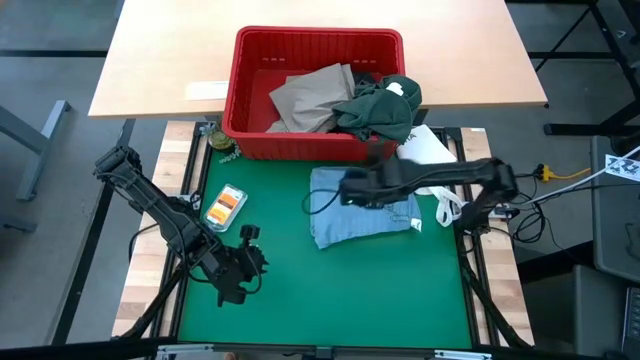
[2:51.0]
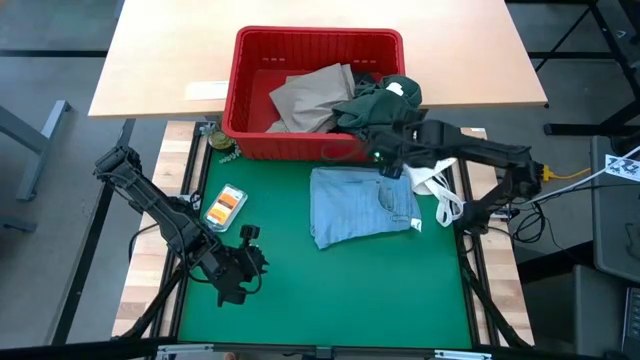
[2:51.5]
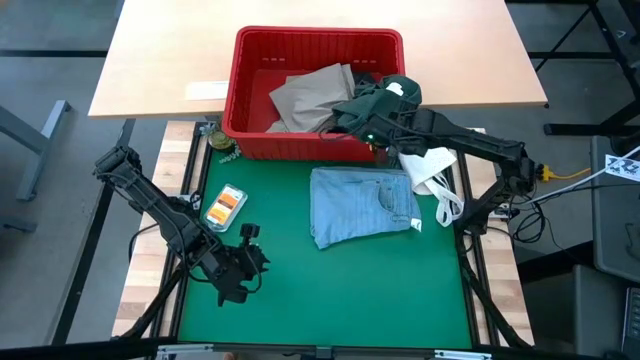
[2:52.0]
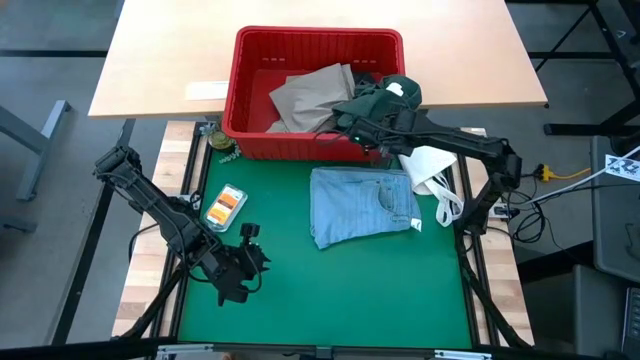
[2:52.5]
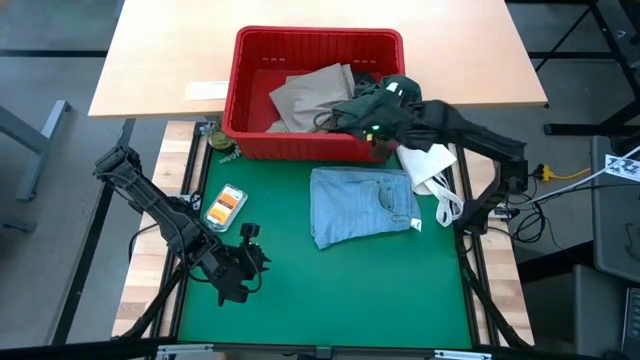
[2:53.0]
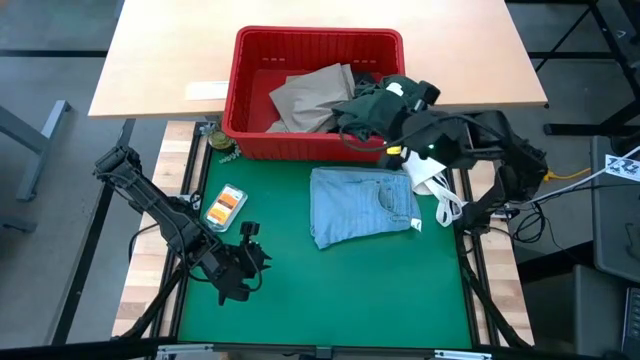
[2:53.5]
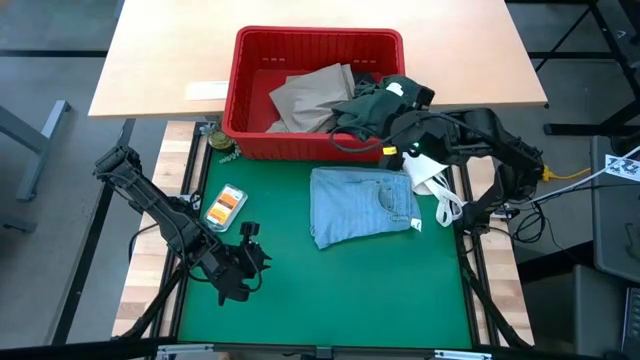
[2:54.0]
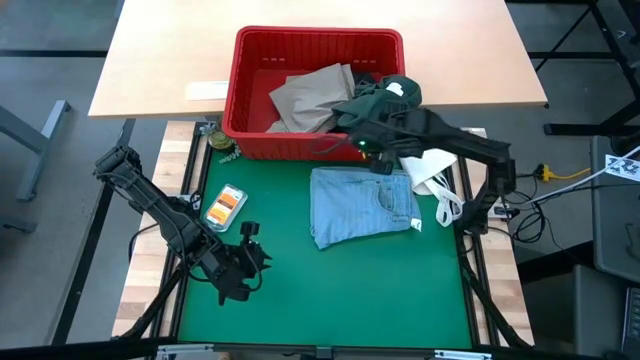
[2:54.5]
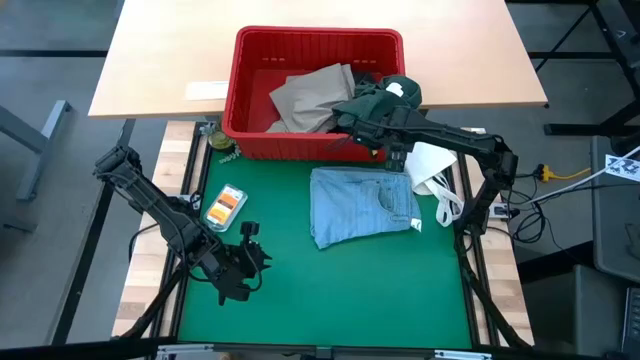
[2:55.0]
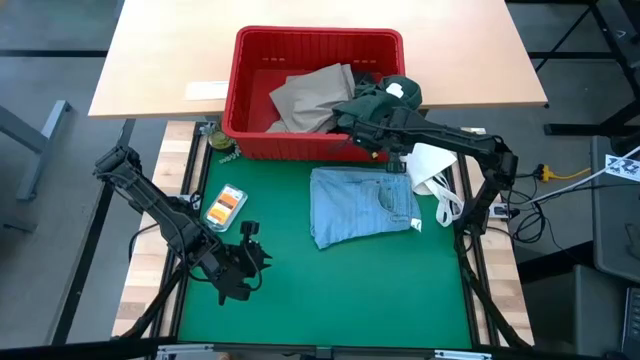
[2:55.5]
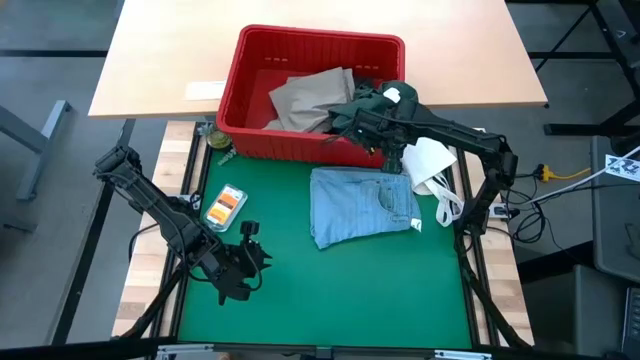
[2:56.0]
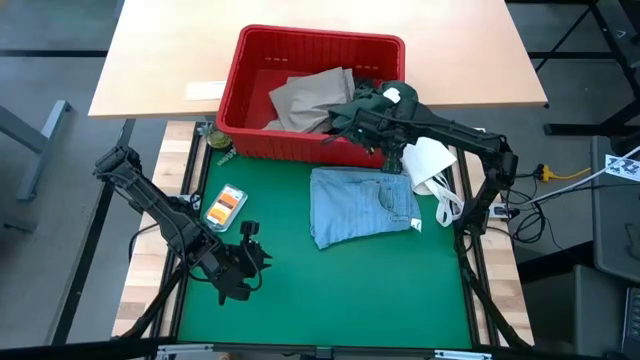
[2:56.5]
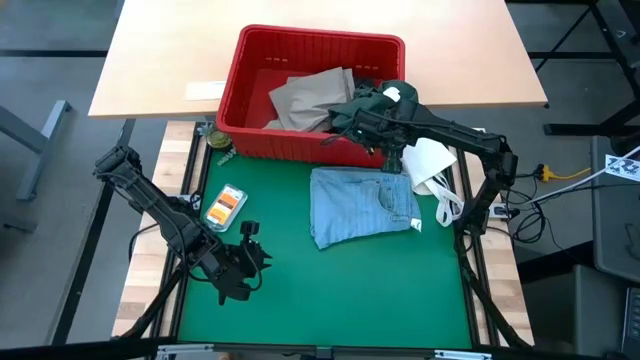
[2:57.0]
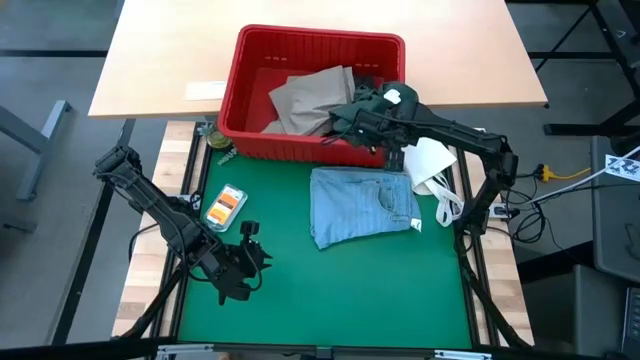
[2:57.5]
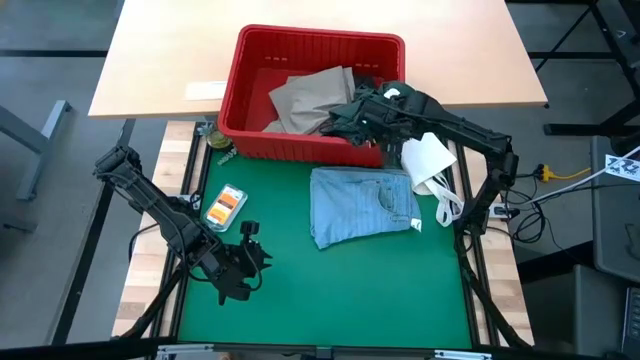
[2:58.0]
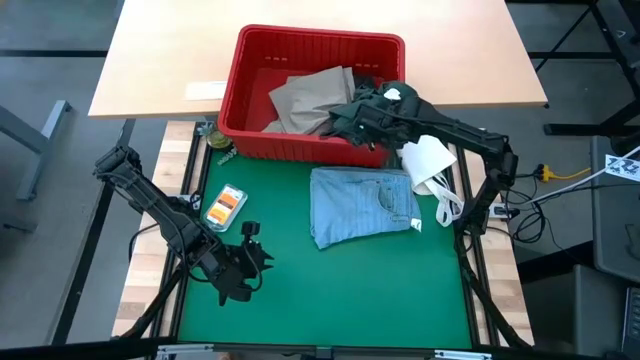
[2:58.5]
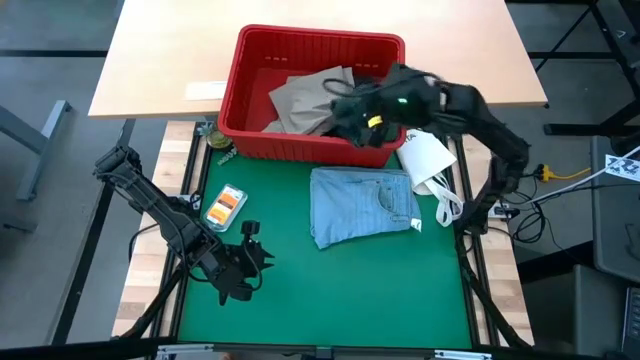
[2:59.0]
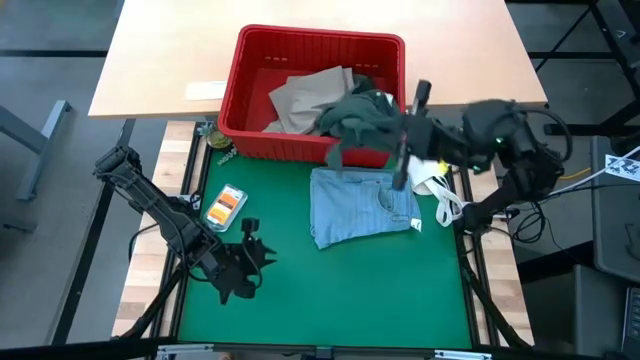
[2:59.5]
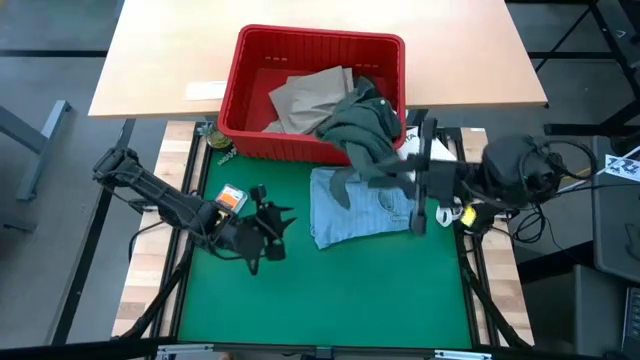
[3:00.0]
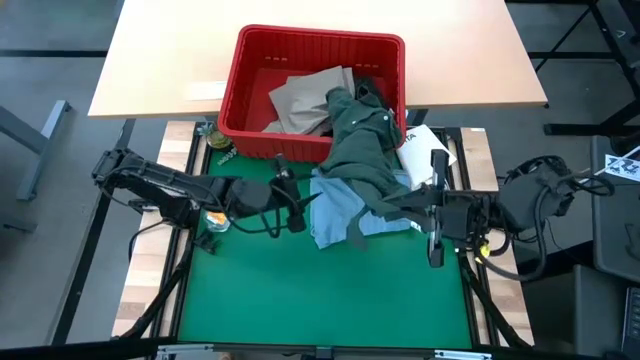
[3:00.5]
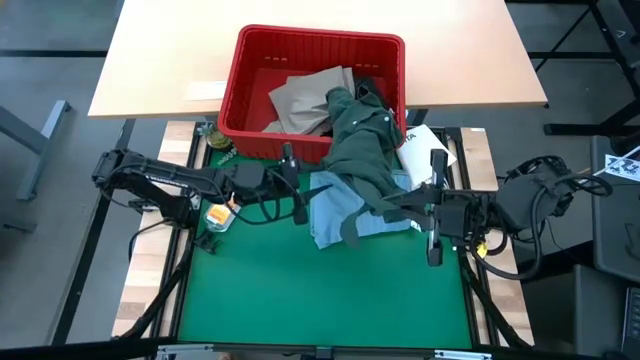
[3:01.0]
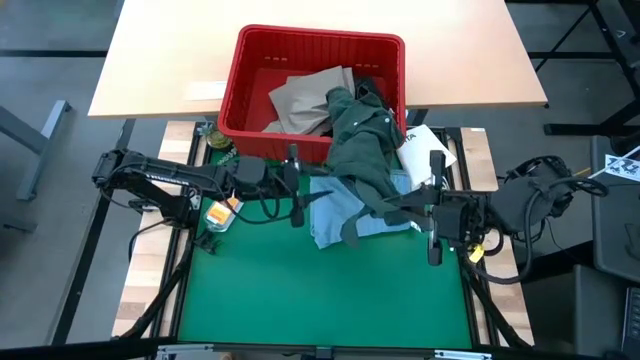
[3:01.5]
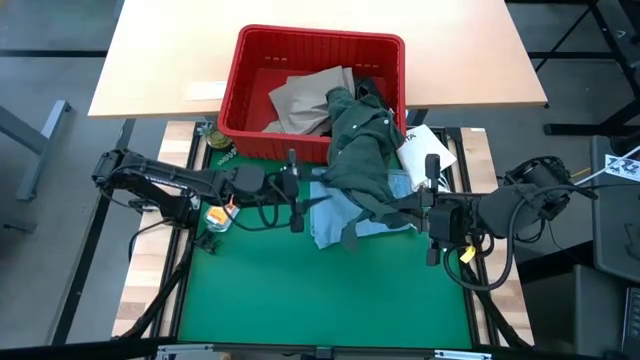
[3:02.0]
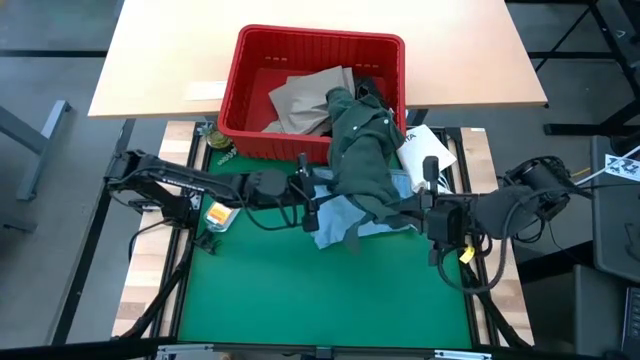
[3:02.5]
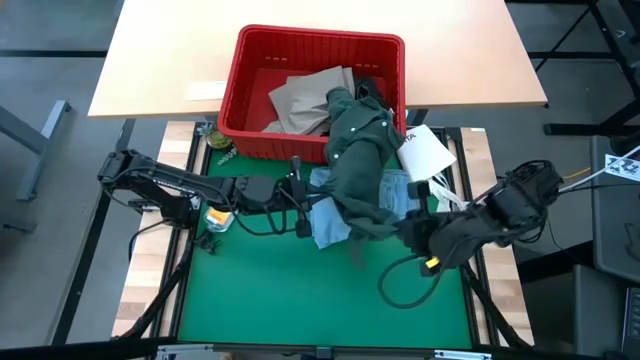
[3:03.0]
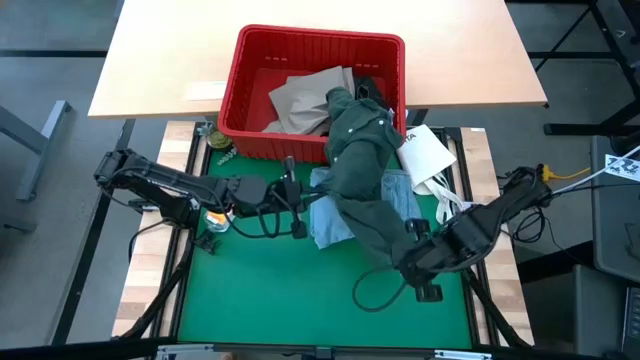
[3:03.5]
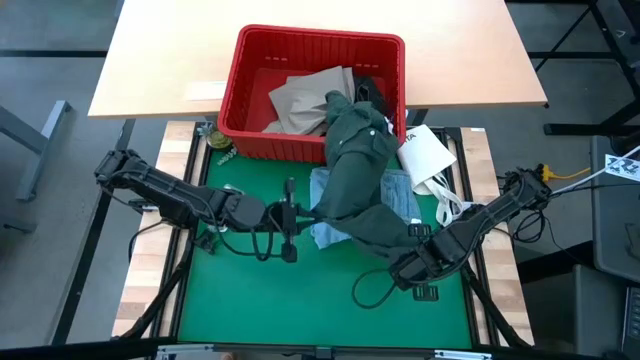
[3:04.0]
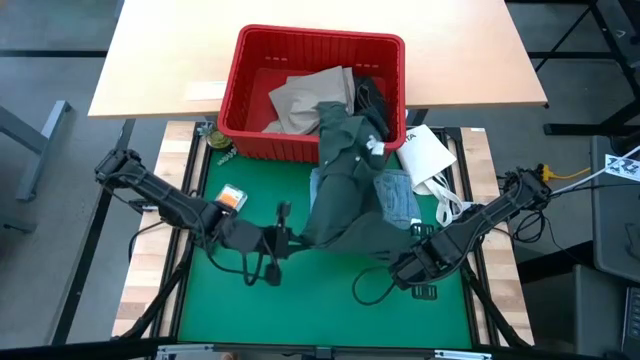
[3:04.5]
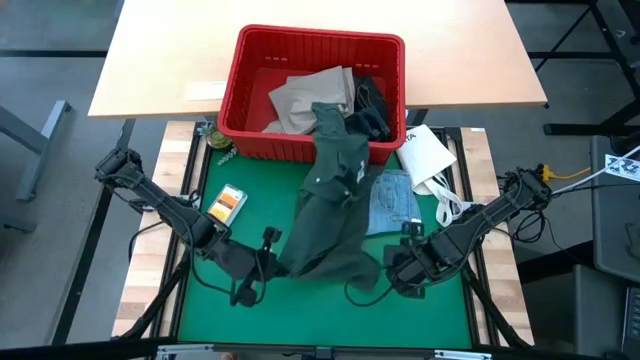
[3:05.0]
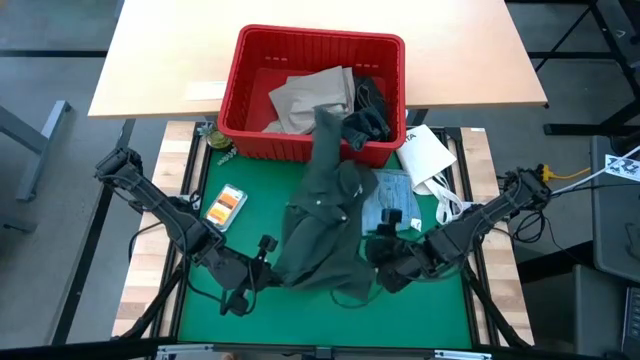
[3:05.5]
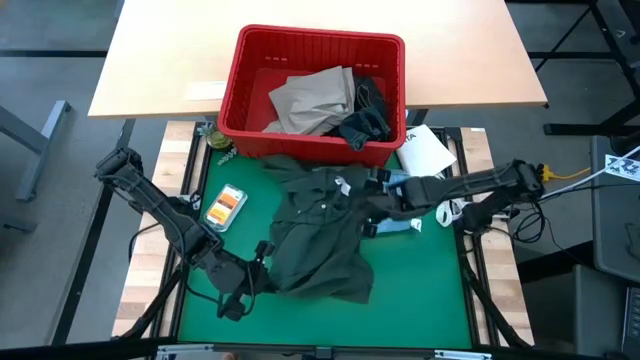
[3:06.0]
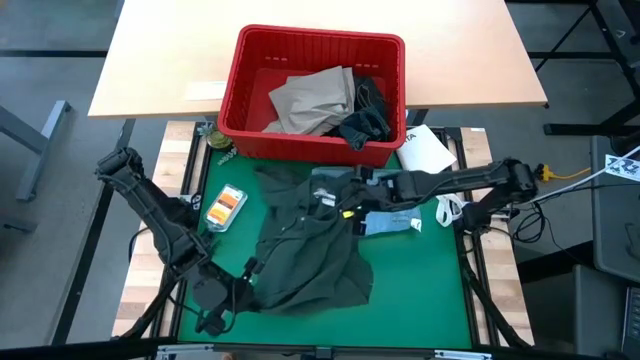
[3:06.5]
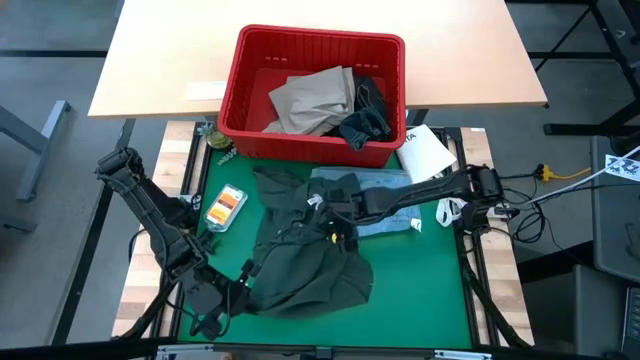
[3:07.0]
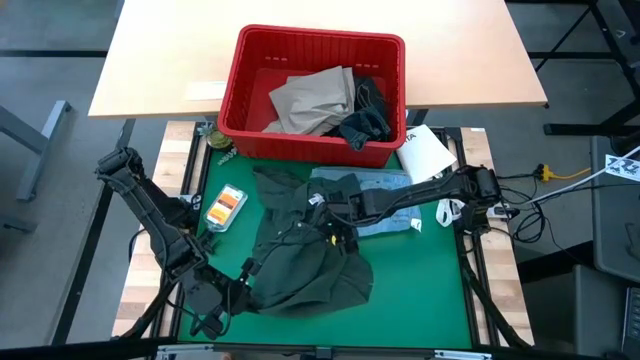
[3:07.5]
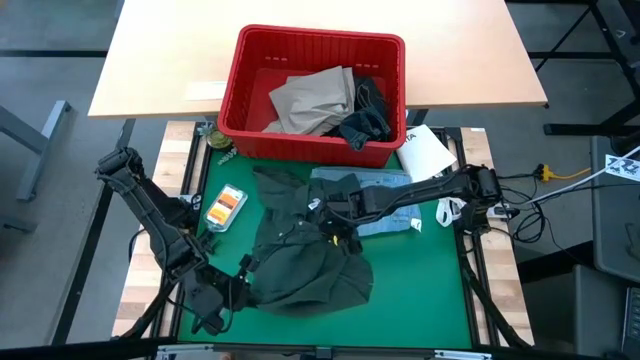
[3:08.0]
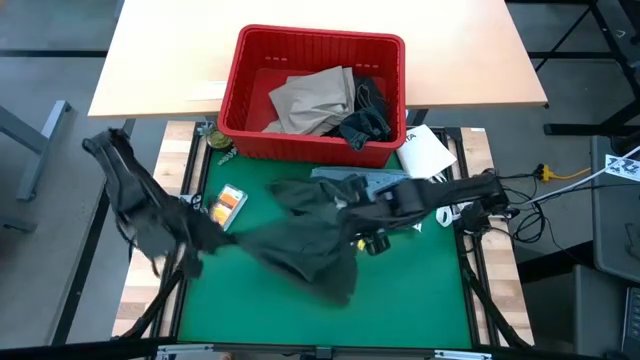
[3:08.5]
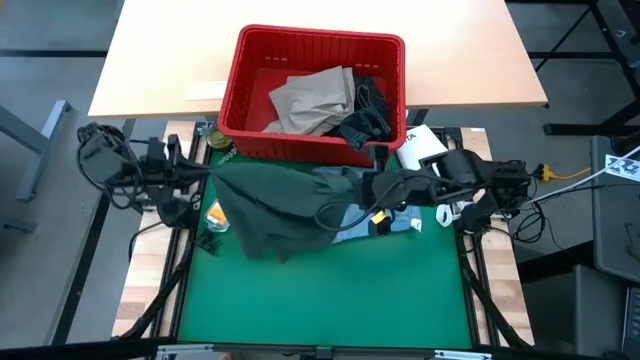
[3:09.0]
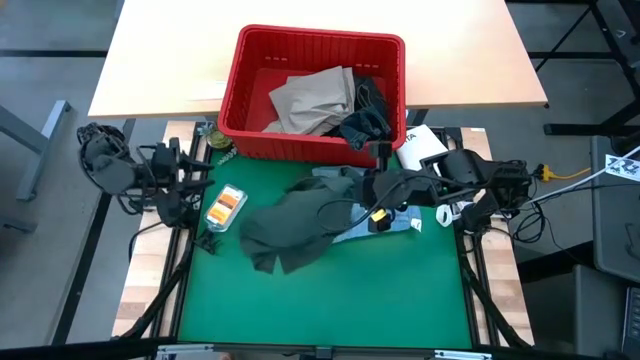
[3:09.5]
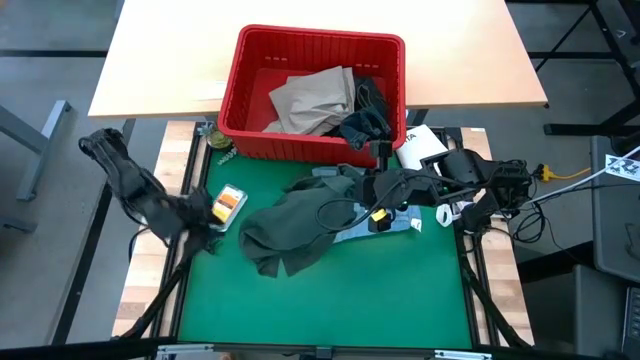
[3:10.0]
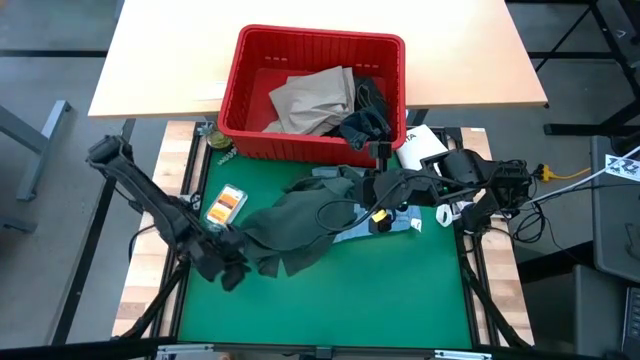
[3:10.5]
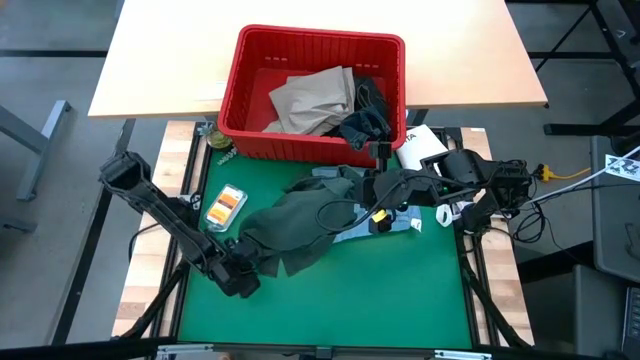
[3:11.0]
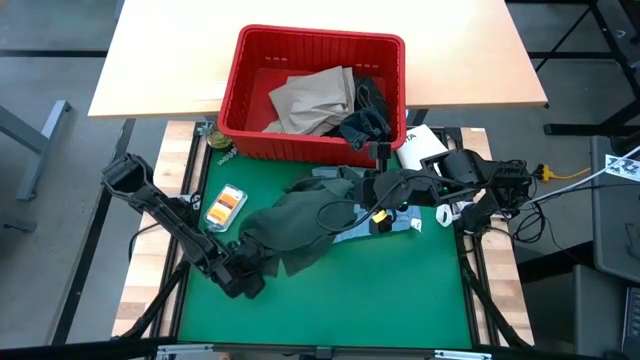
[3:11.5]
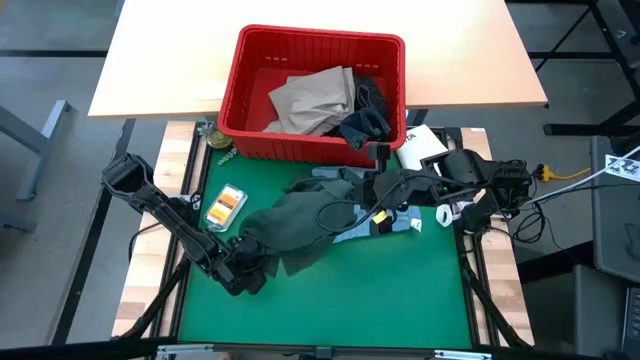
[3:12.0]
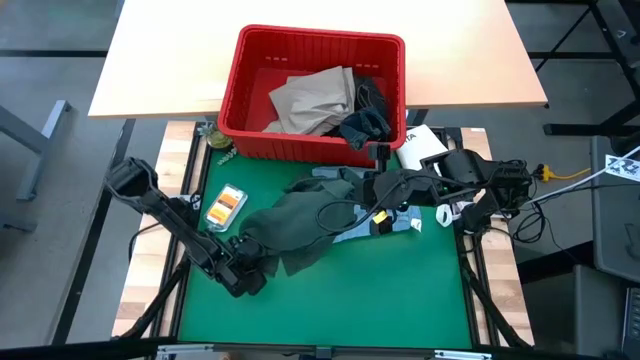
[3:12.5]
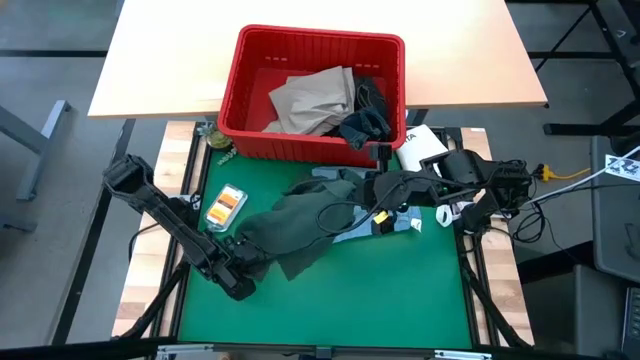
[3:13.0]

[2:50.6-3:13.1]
Task: Fold Laundry from Bin
Fold the green polo shirt
